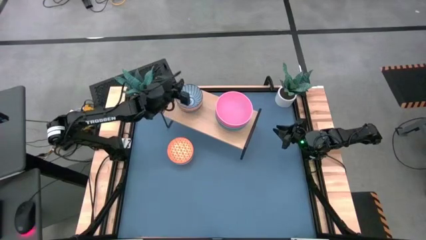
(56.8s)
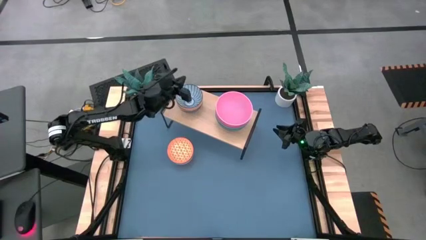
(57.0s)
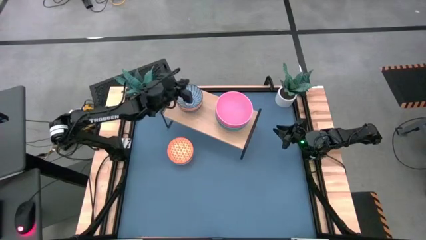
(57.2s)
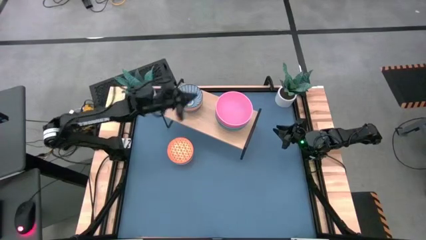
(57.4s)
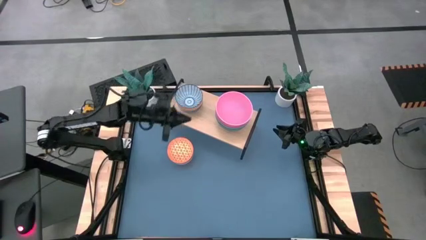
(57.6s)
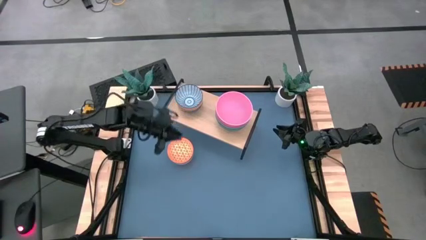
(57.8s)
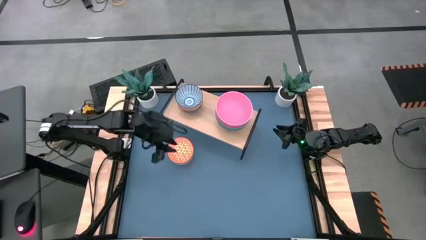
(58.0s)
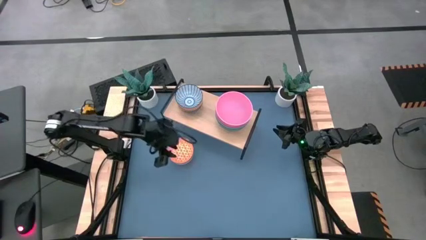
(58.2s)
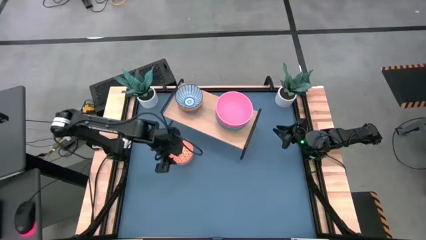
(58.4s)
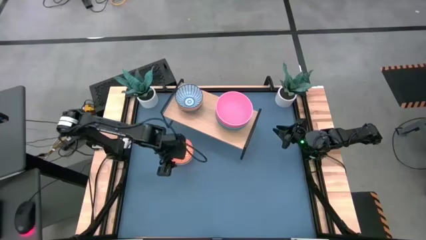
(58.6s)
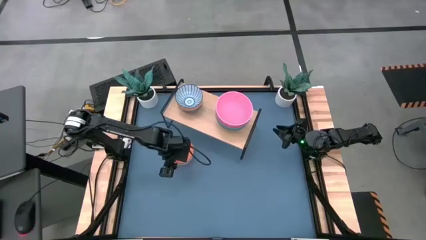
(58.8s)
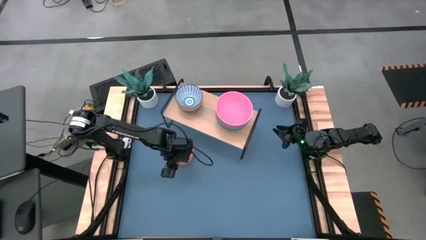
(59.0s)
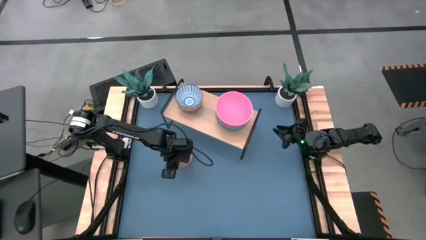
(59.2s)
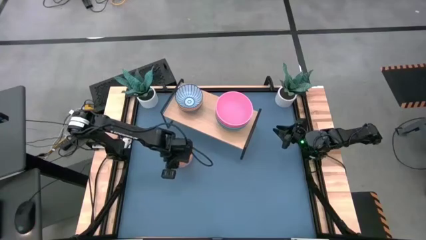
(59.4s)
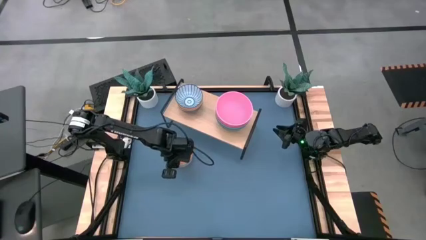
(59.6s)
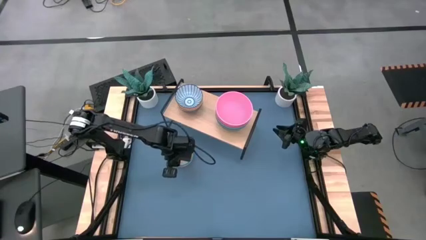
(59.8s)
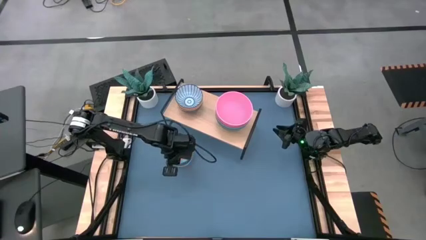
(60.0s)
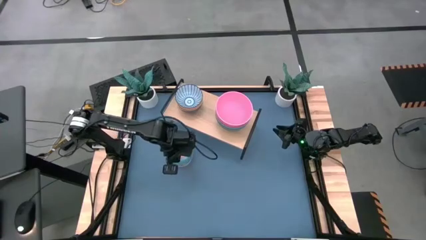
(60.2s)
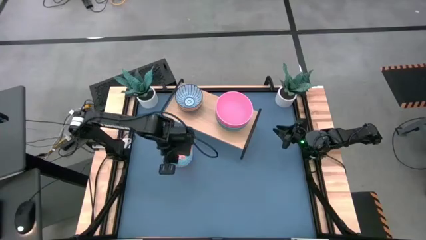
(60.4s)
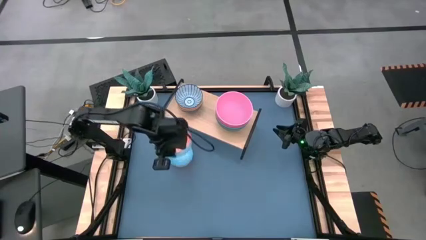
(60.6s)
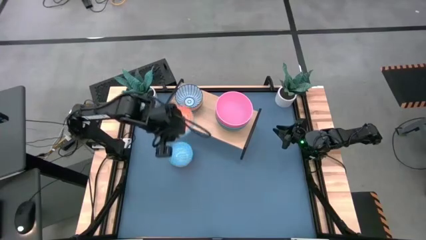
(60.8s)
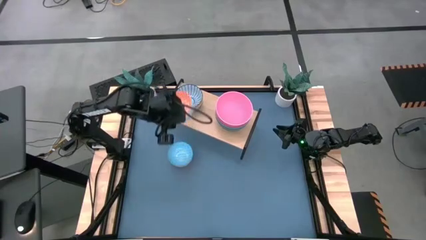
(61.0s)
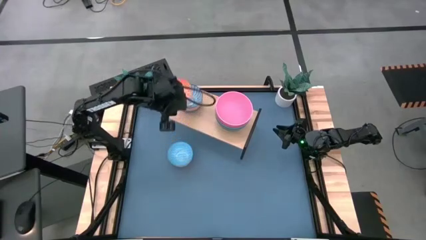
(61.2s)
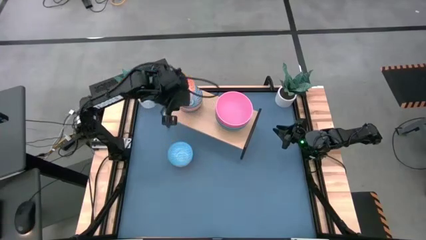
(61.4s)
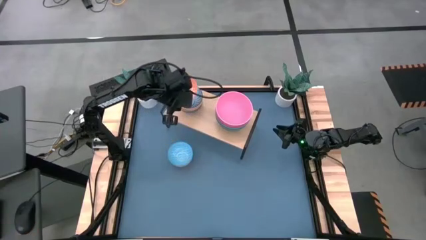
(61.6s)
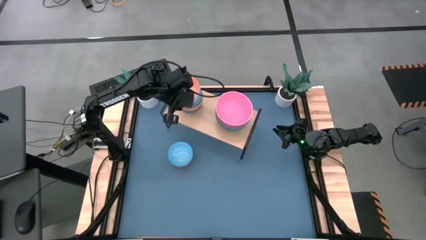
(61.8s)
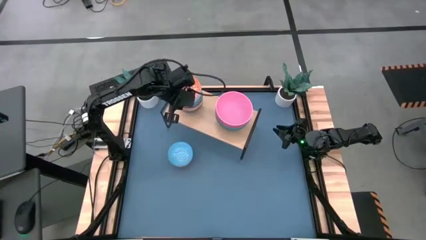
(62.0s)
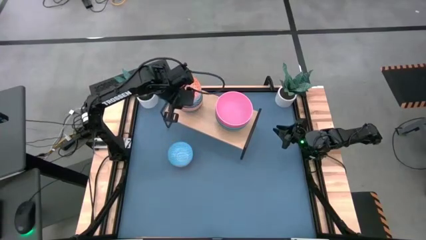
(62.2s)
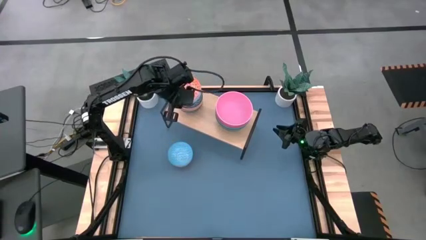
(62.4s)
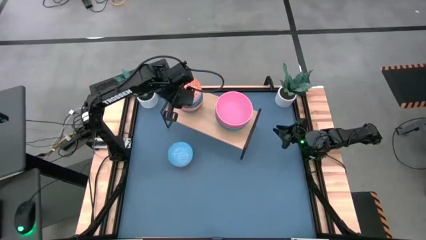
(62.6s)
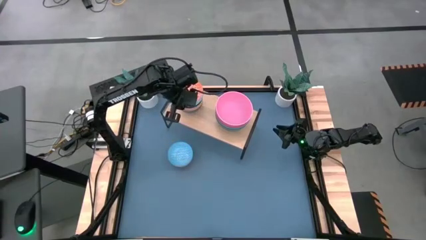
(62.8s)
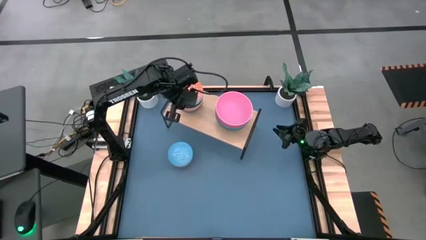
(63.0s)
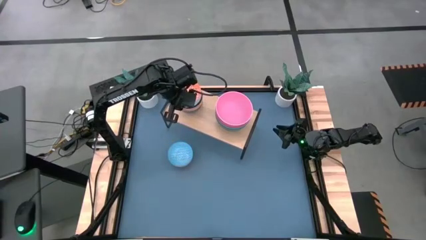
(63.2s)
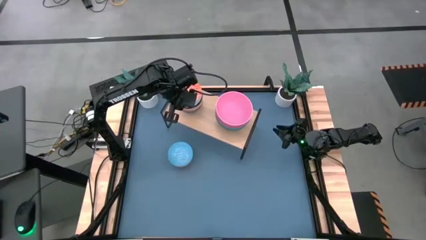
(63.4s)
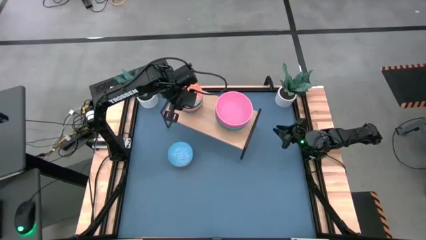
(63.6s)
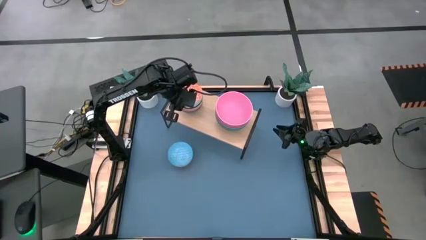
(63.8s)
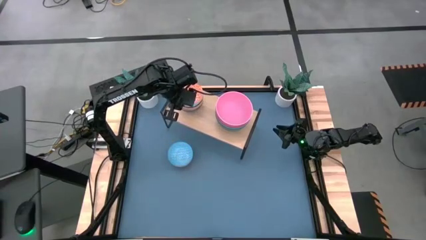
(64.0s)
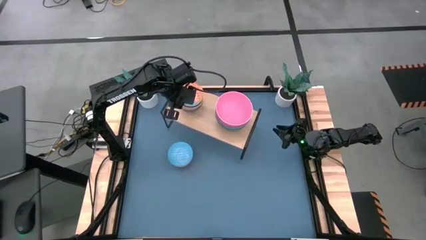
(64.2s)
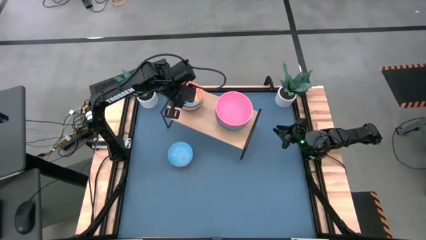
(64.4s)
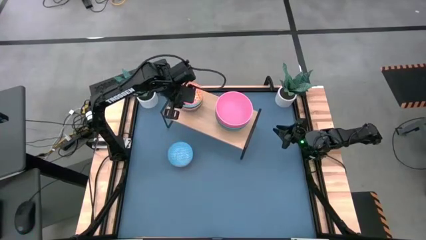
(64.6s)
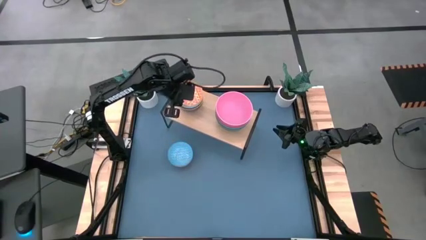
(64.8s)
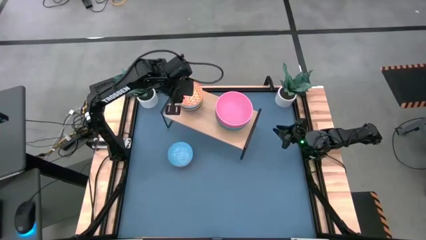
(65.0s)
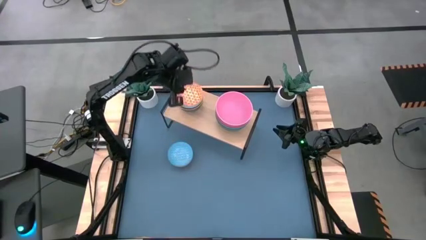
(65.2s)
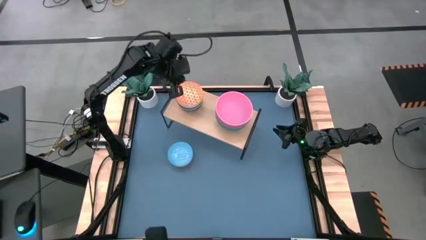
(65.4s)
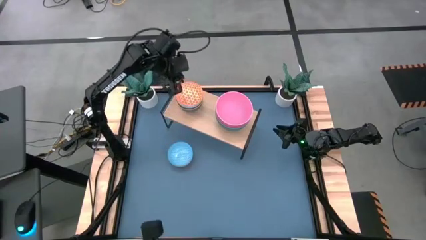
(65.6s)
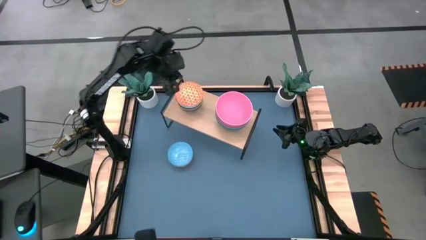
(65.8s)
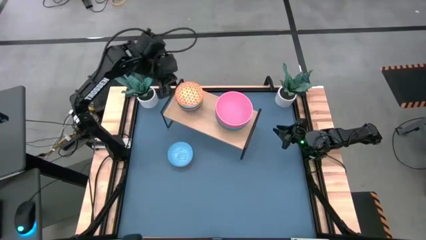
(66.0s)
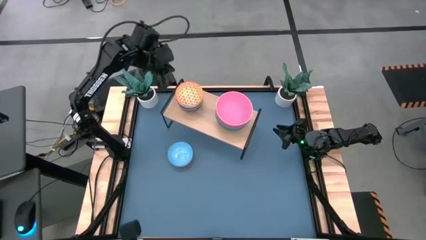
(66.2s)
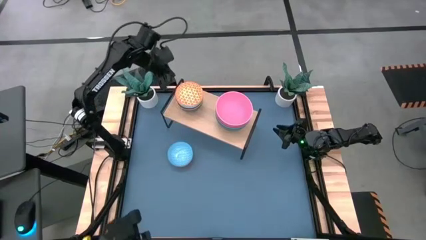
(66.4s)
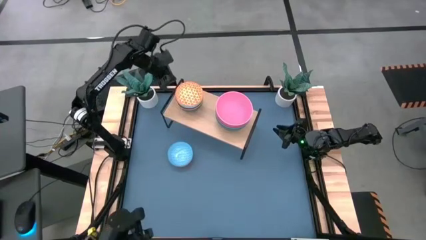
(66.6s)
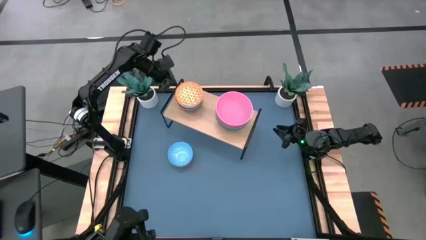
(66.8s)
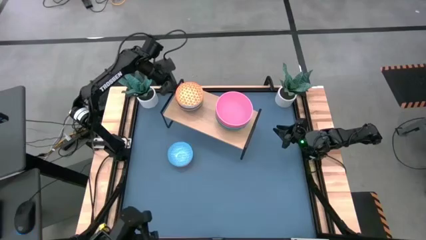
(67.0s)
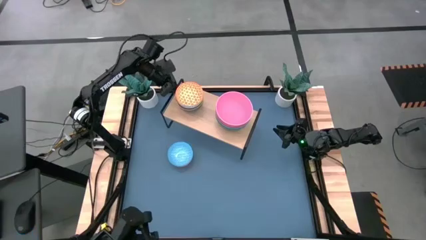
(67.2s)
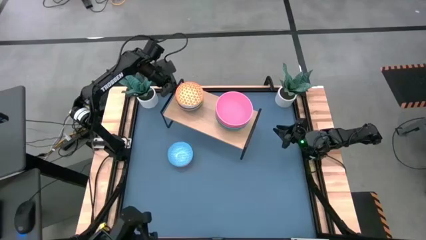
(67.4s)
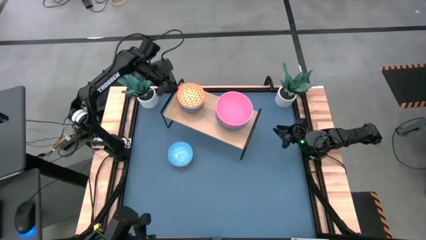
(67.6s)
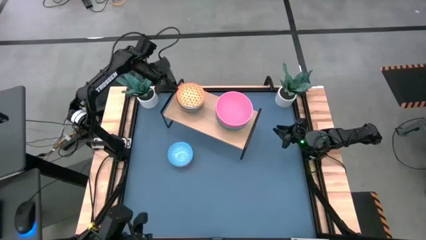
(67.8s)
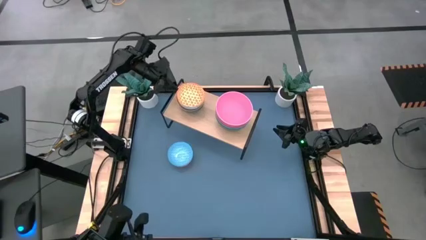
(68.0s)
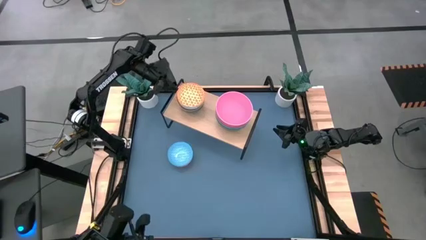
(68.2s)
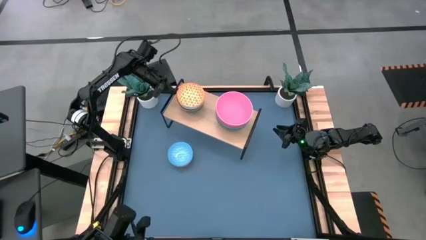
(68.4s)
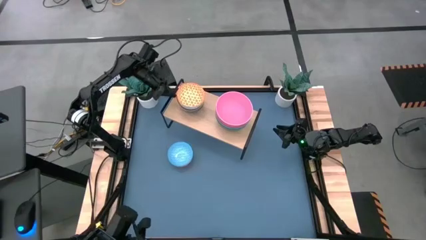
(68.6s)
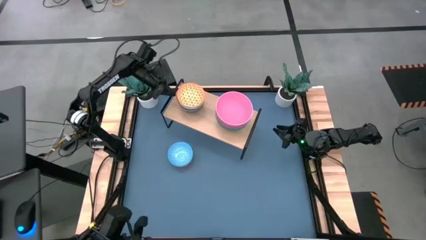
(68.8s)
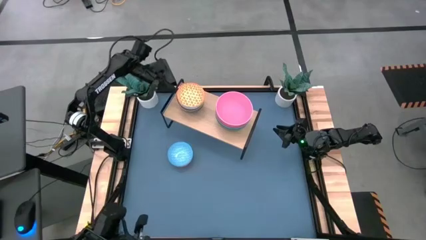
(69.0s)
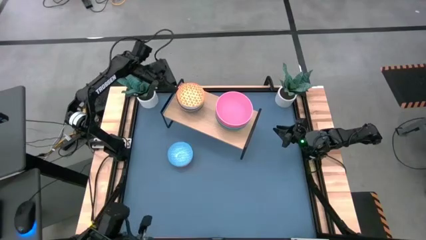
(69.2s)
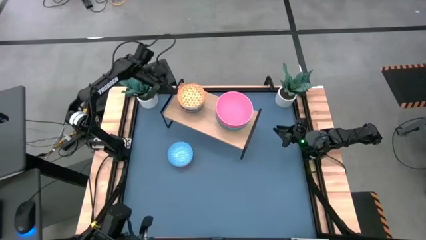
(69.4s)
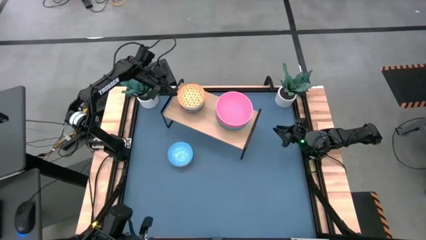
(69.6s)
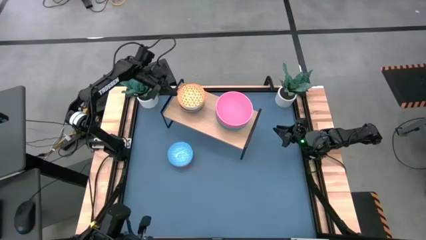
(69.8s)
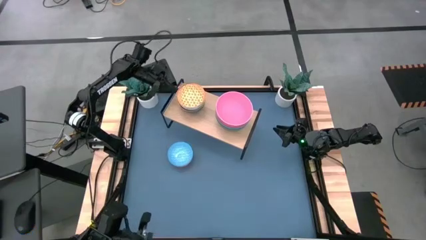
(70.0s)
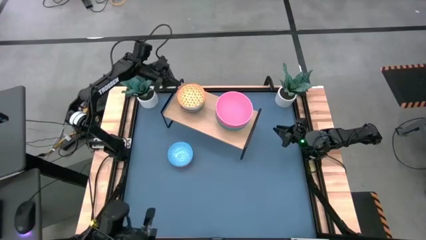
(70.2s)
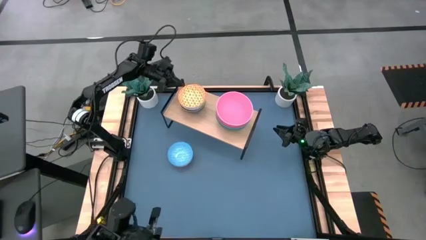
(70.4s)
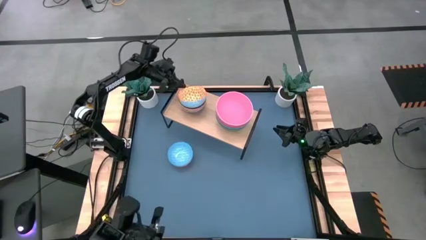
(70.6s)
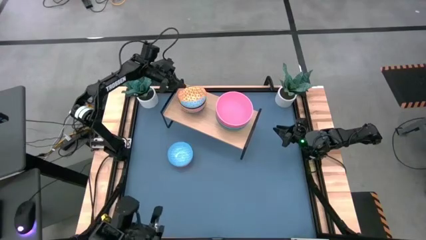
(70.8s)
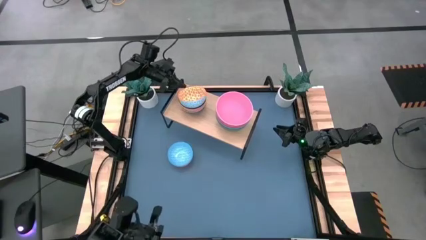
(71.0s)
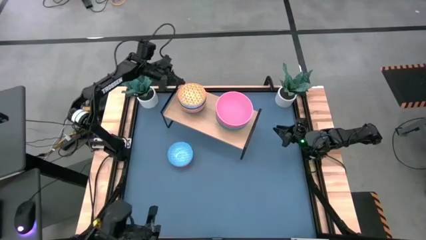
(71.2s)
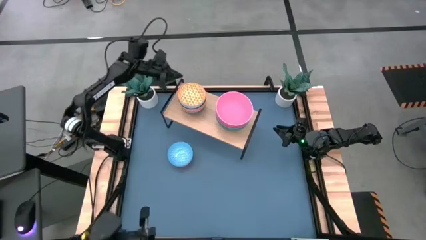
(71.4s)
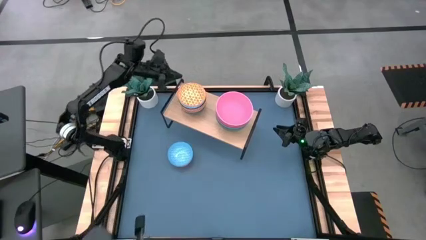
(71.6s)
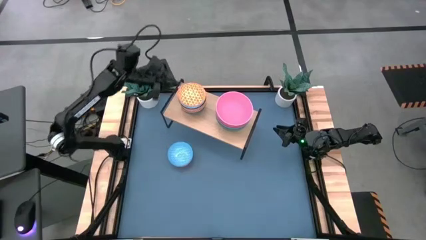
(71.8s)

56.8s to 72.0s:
Task: Place and stack bowls onto a shelf
Stack the printed orange bowl onto the printed blue bowl on the shelf
